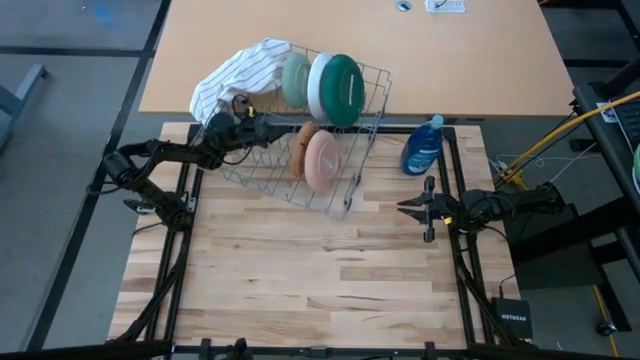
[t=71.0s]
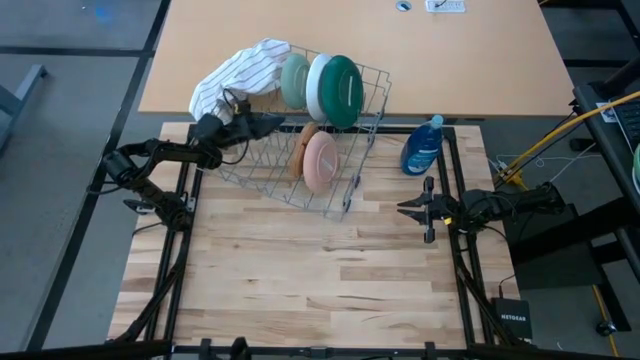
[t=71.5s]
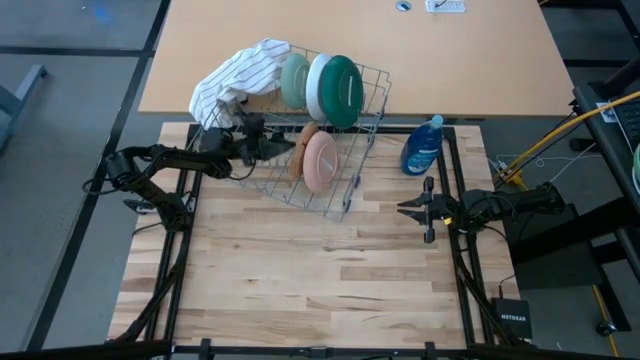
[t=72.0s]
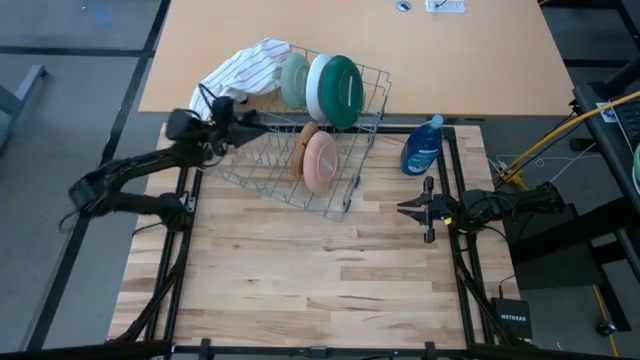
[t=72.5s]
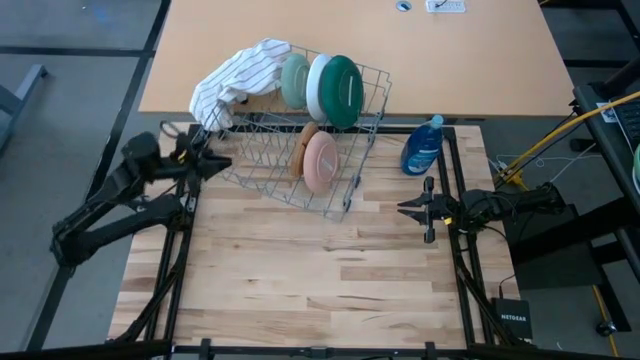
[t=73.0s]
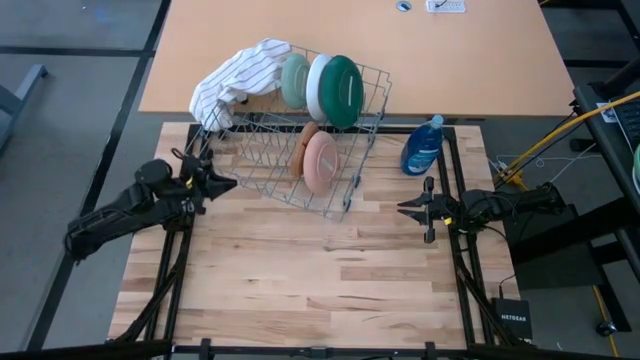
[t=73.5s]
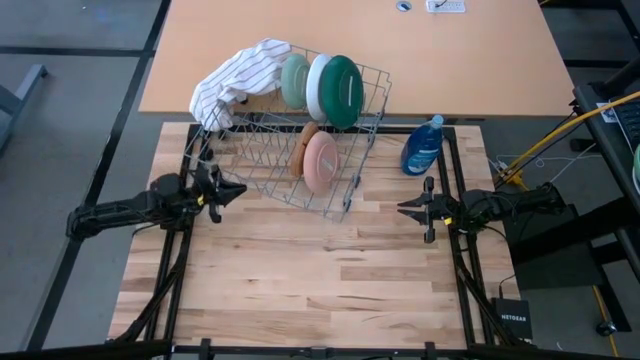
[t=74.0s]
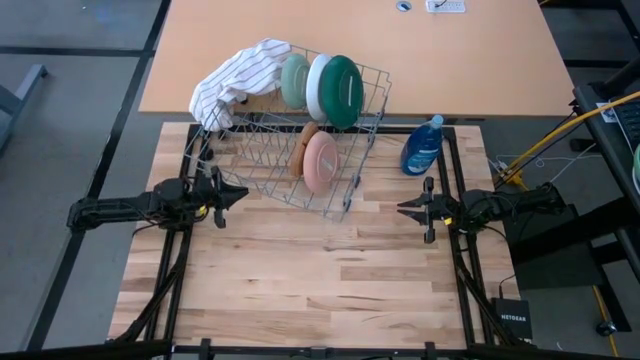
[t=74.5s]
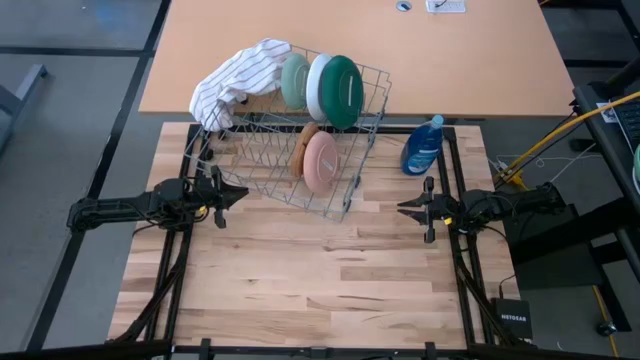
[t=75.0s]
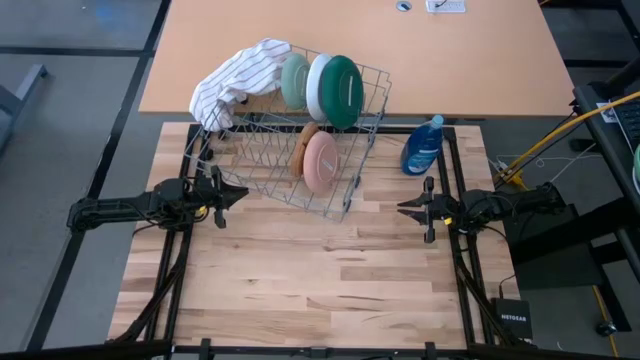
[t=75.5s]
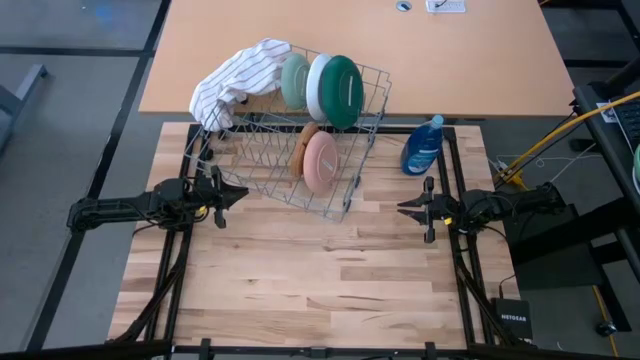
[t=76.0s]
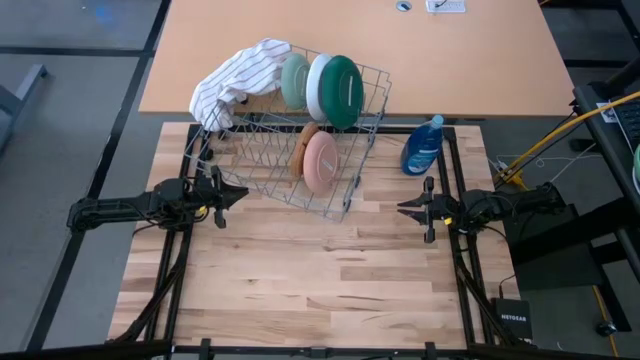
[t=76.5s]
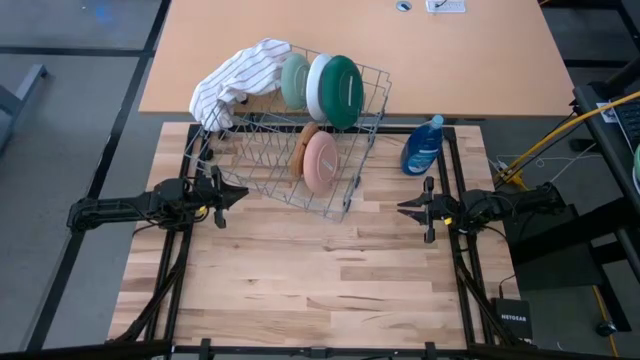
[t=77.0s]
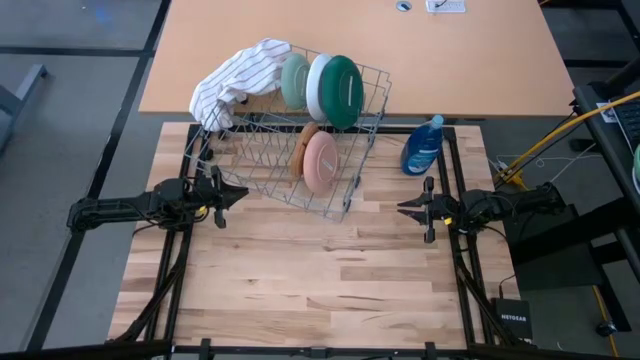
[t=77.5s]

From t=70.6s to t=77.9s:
Task: Sort dishes
Return to Home Position

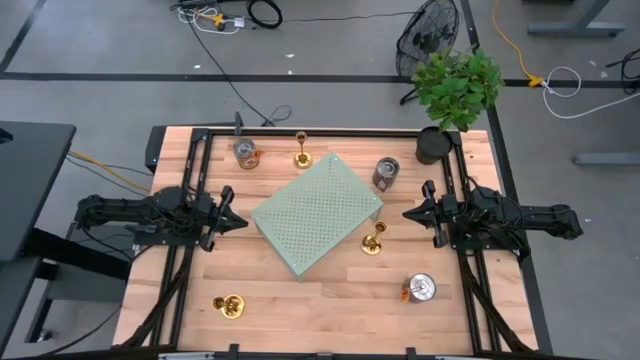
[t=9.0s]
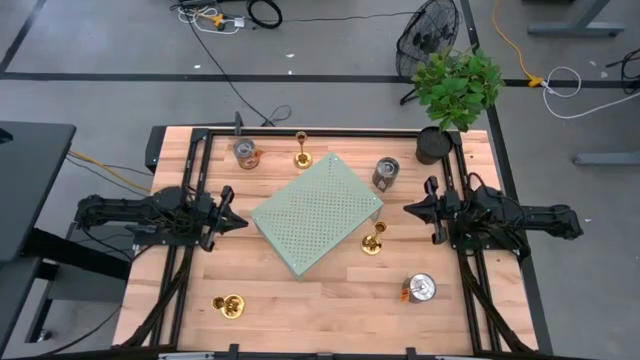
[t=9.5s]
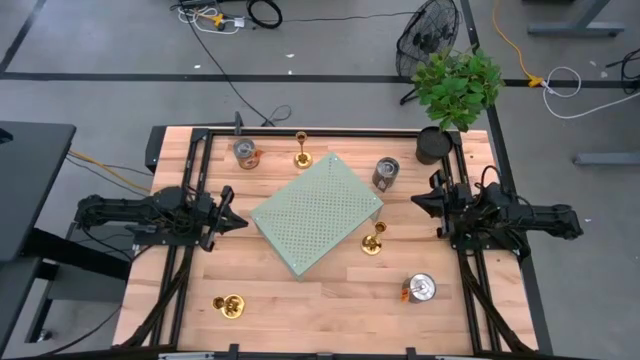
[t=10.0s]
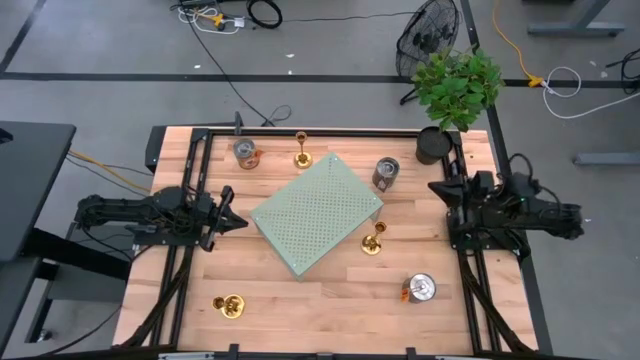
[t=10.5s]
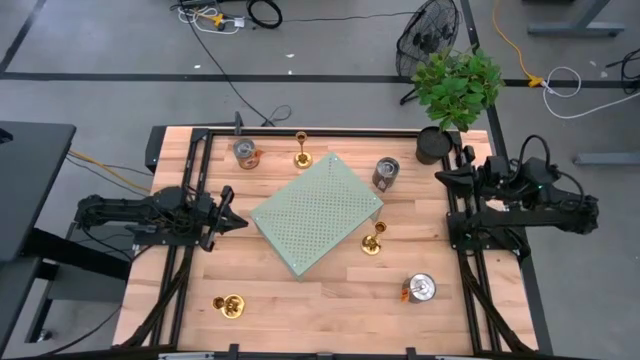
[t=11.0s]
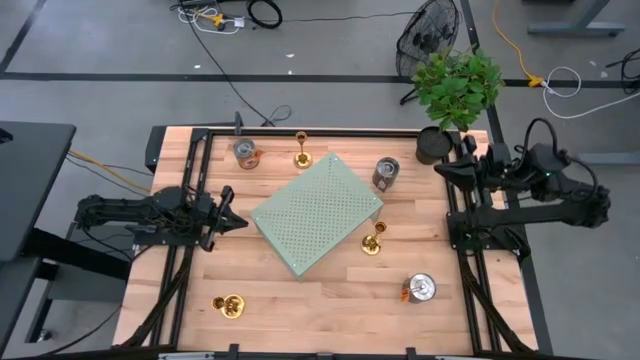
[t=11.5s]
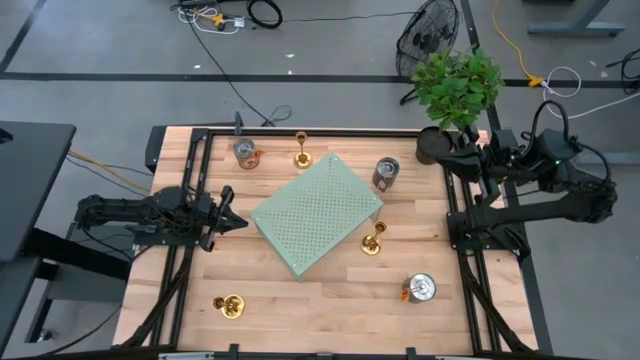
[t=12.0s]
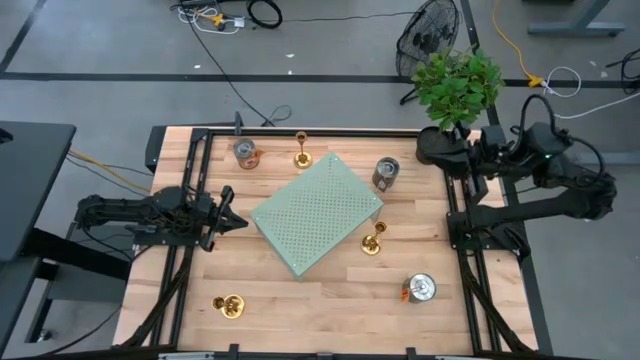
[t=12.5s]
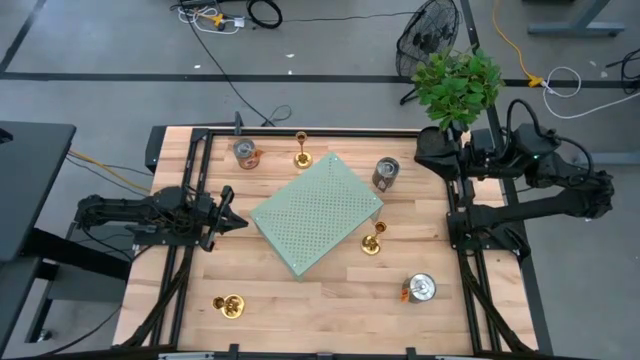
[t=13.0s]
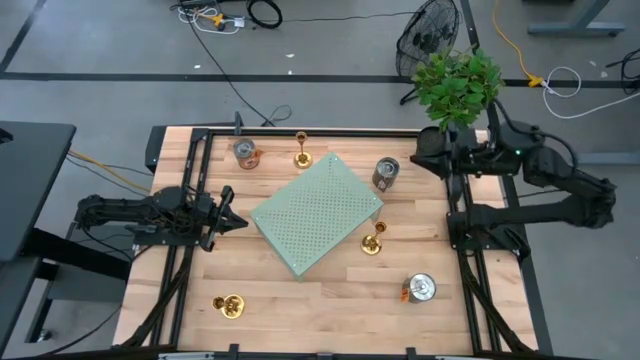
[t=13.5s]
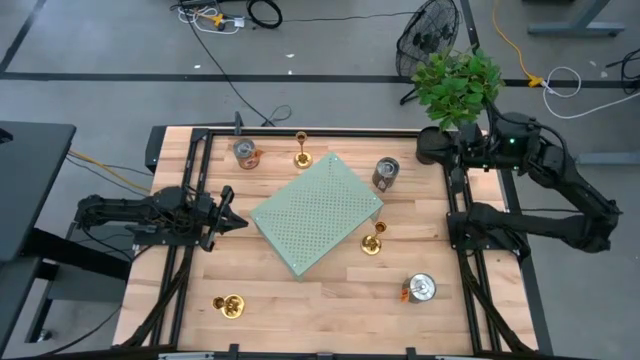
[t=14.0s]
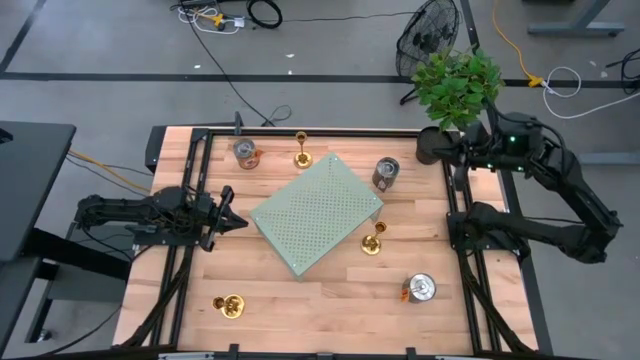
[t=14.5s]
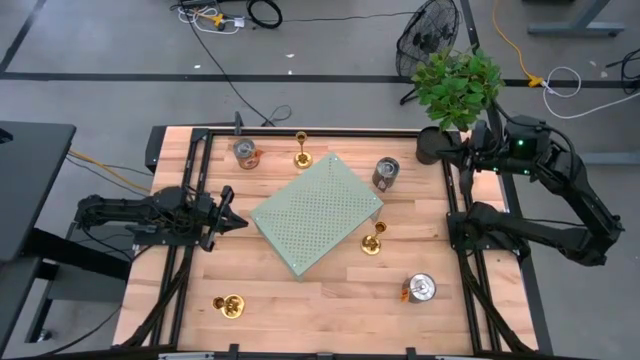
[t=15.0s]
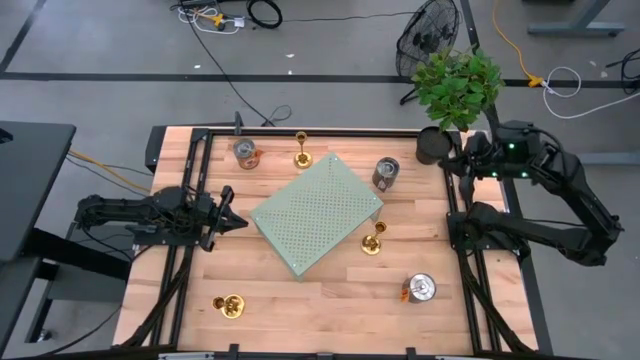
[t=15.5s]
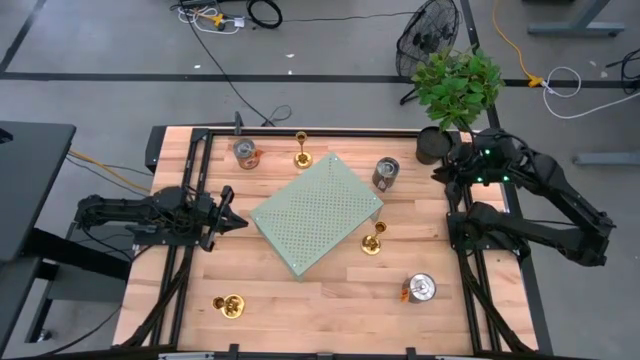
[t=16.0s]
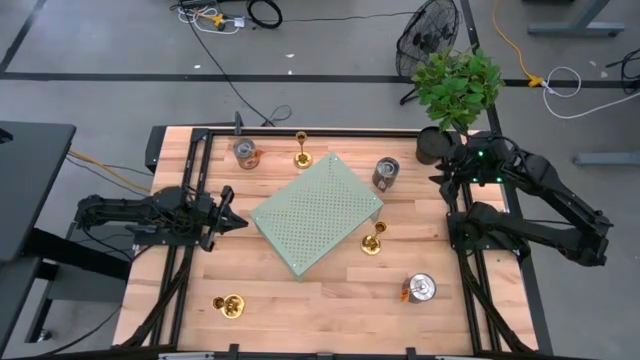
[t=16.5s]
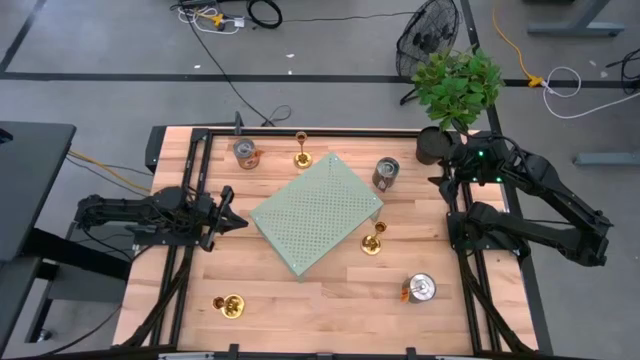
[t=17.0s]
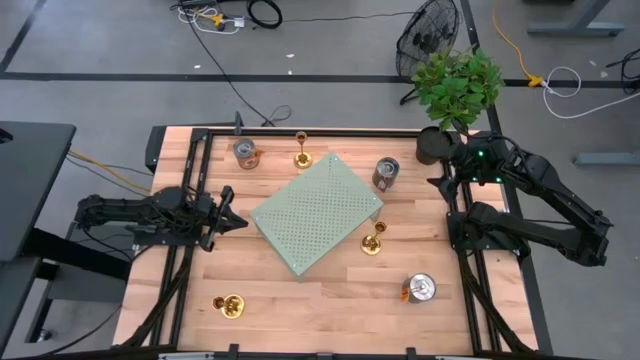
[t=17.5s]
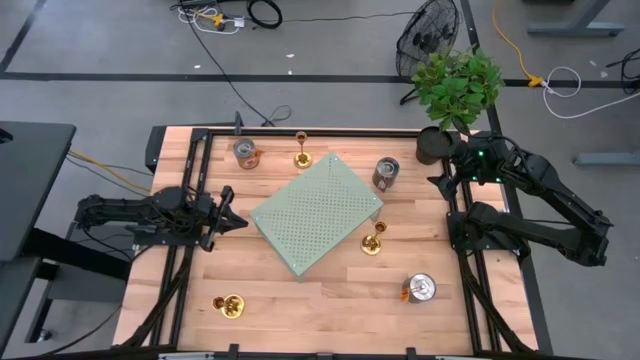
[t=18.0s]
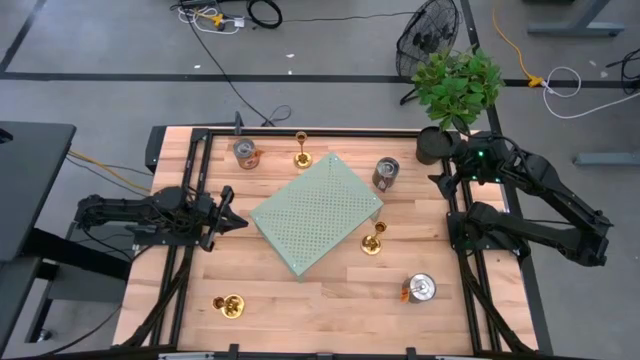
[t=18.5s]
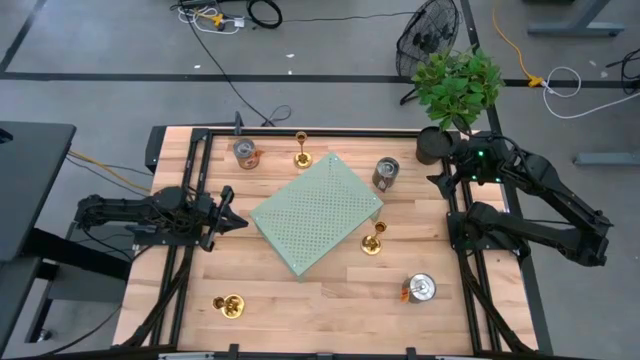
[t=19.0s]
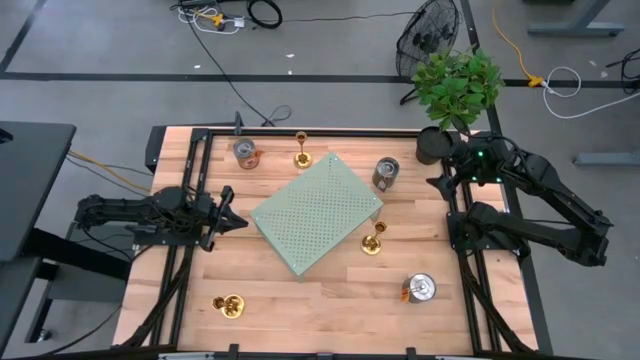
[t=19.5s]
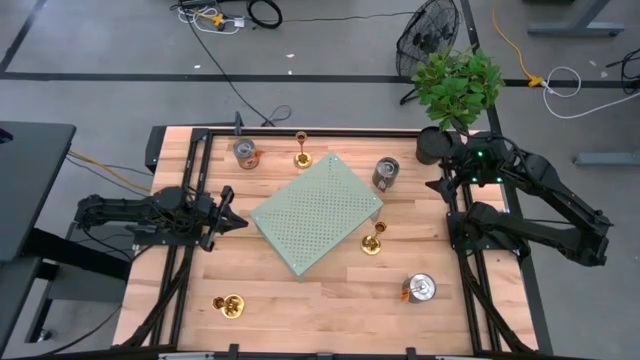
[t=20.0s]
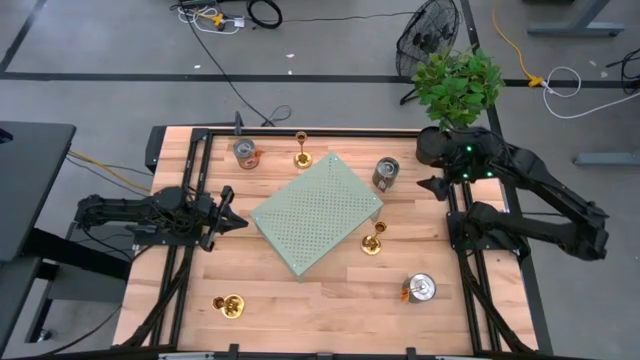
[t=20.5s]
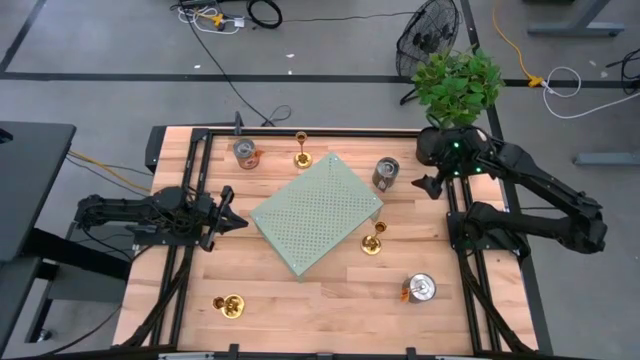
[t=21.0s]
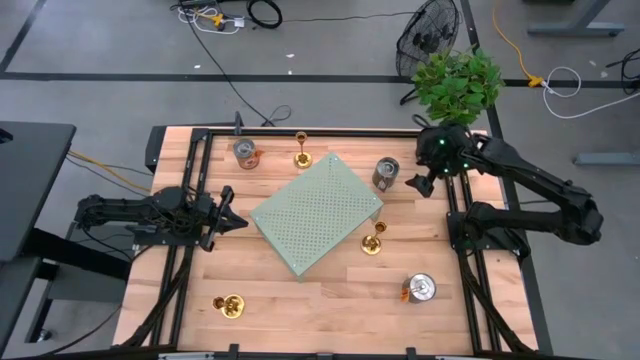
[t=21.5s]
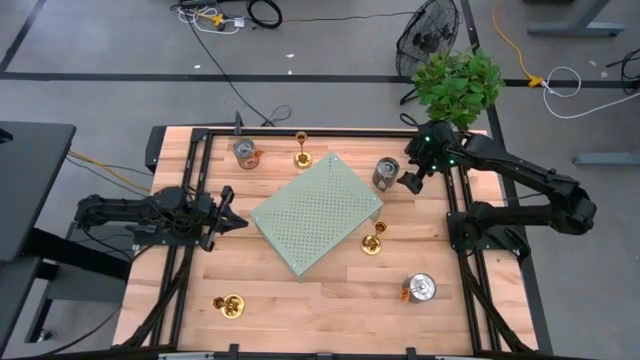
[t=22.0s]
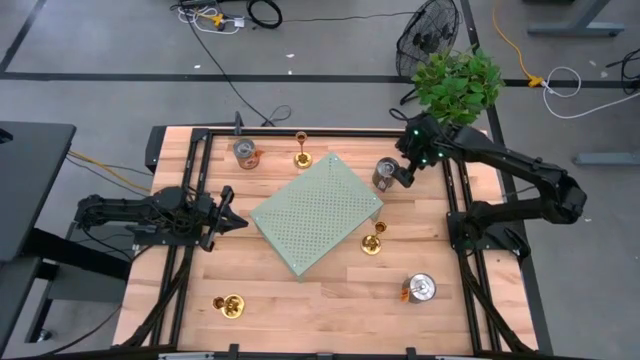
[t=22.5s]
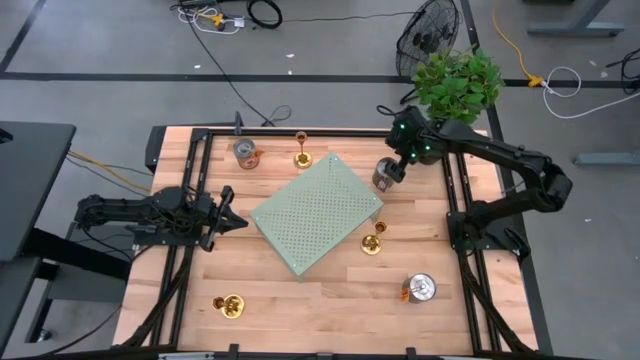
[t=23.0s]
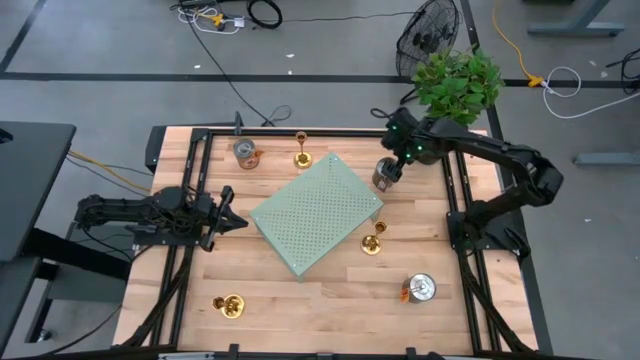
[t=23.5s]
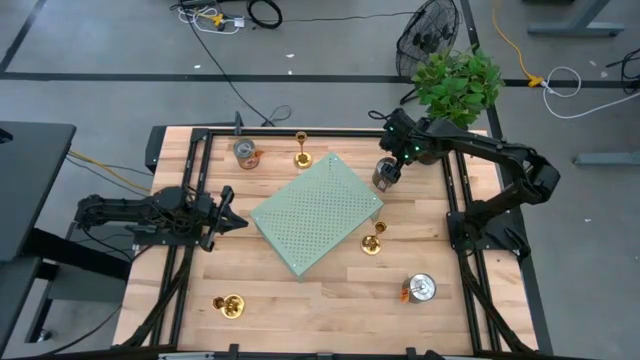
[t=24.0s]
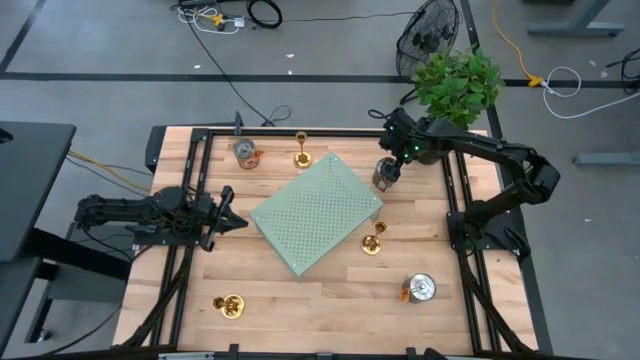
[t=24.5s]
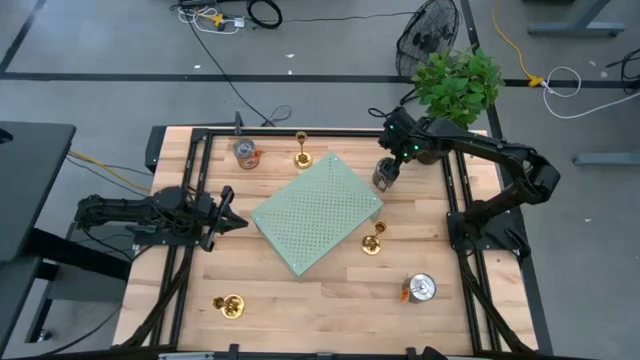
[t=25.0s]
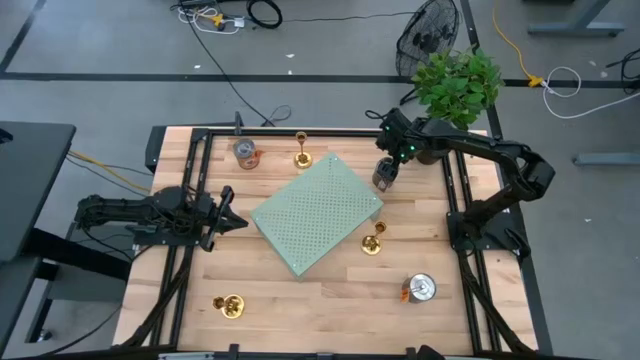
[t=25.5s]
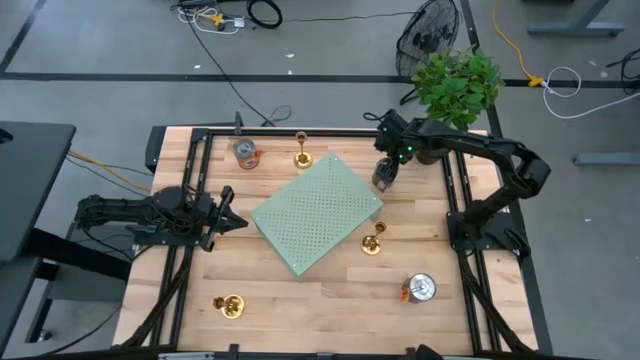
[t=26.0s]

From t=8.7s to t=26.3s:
Task: Pick & Place candle stick holders
Put the top right silver scented candle on the shelf
